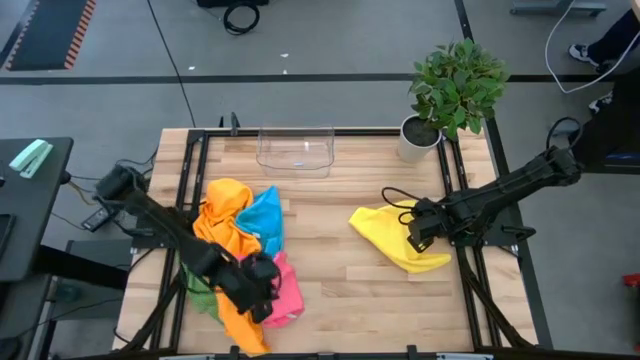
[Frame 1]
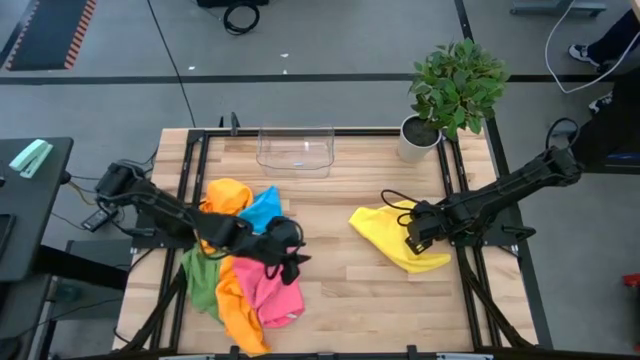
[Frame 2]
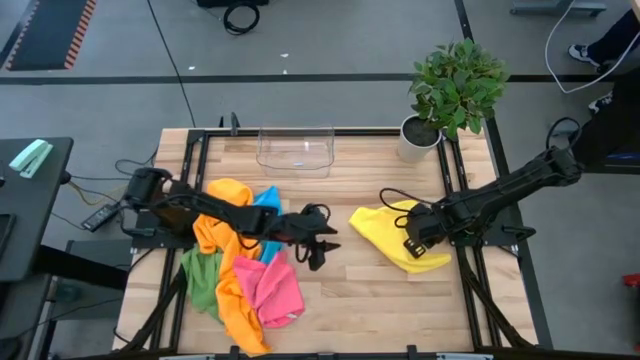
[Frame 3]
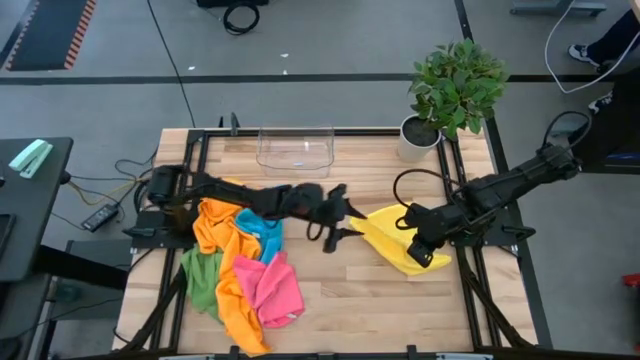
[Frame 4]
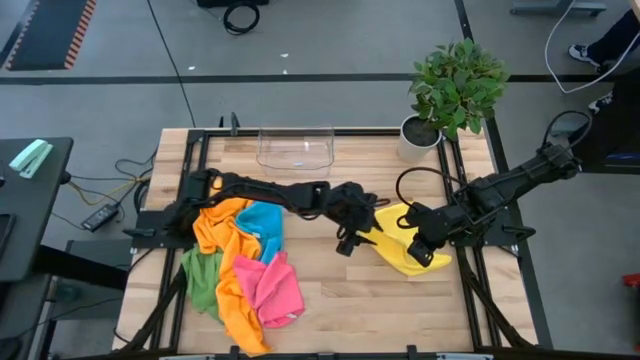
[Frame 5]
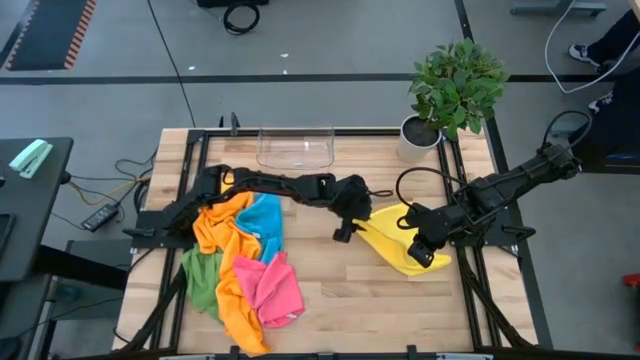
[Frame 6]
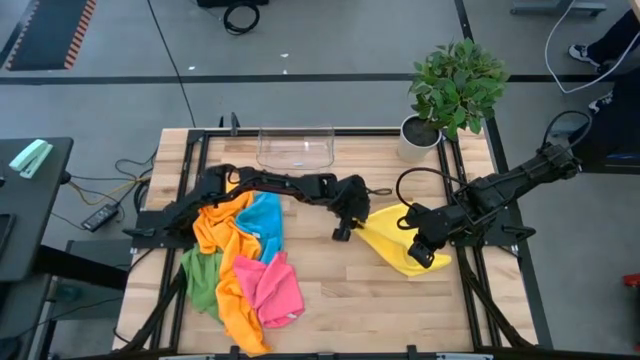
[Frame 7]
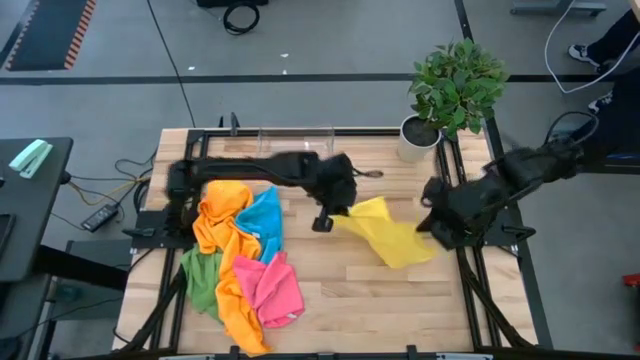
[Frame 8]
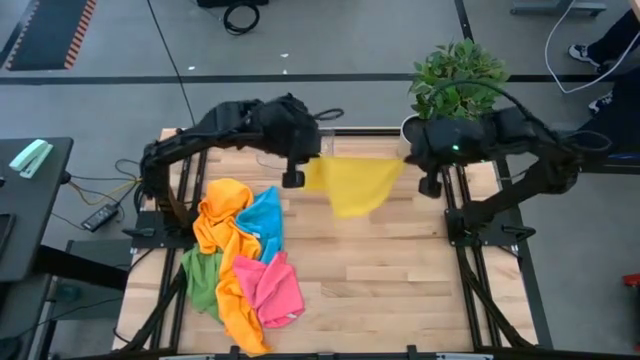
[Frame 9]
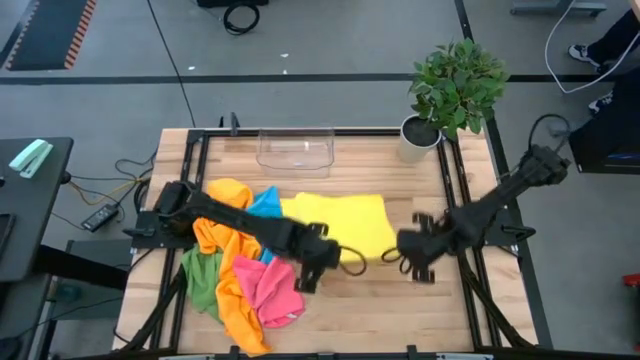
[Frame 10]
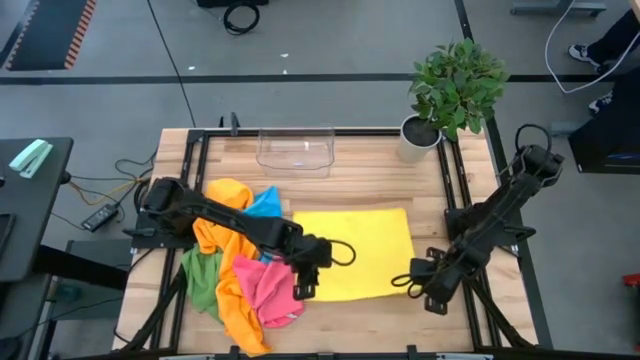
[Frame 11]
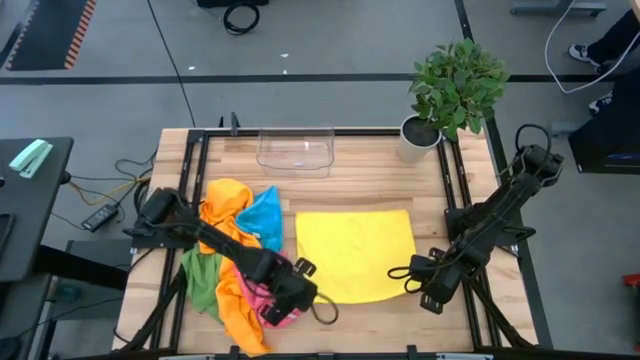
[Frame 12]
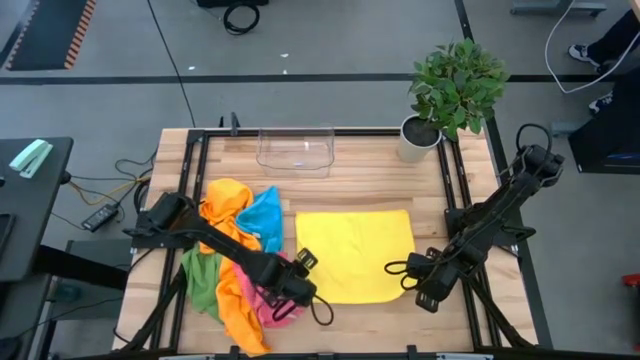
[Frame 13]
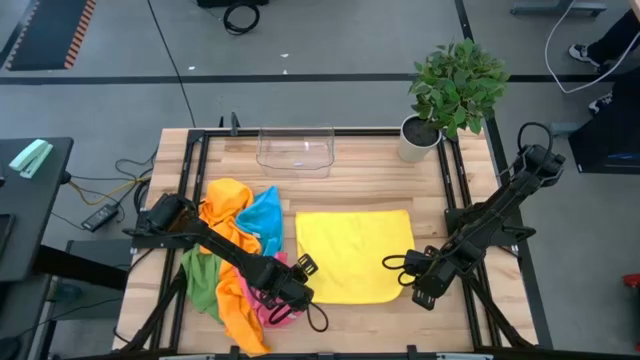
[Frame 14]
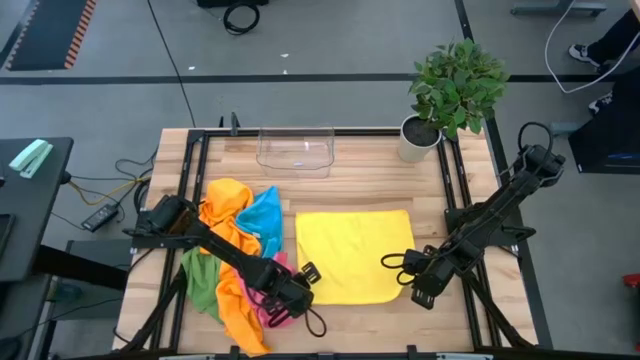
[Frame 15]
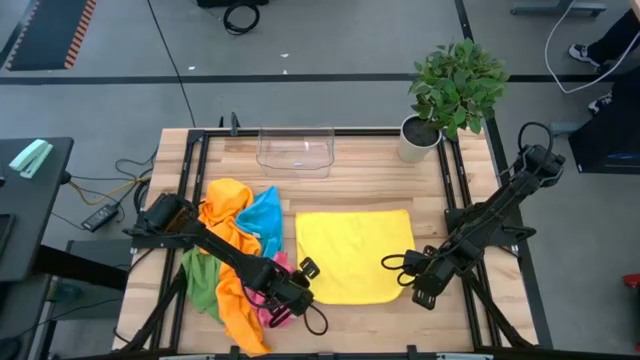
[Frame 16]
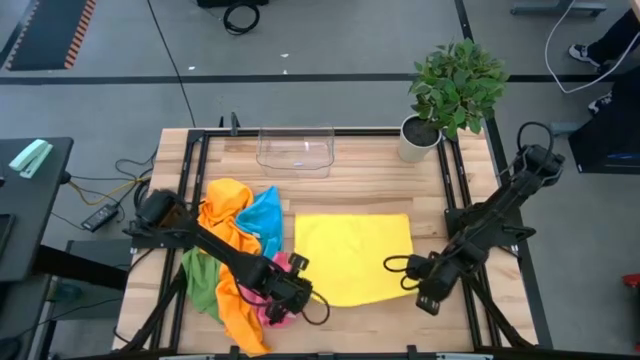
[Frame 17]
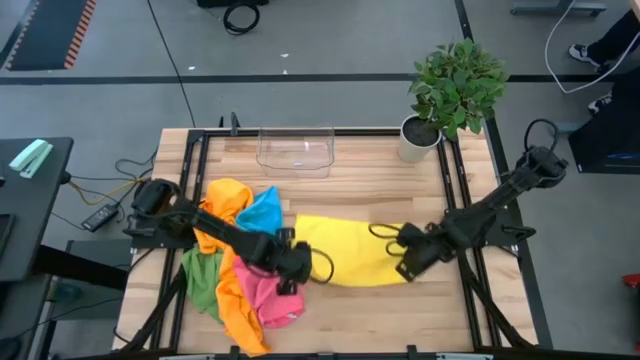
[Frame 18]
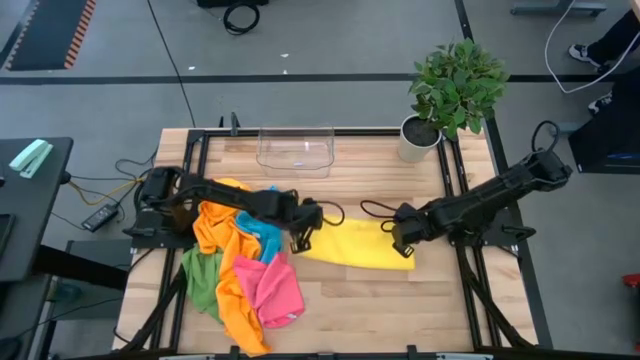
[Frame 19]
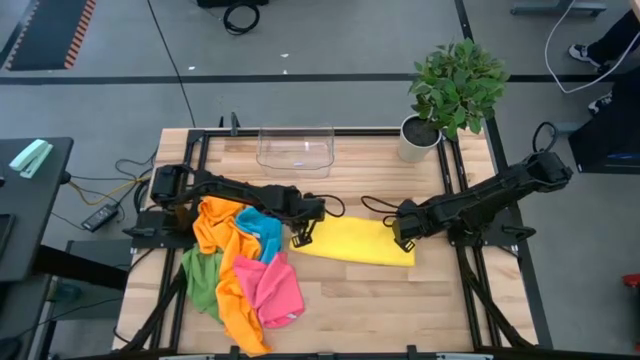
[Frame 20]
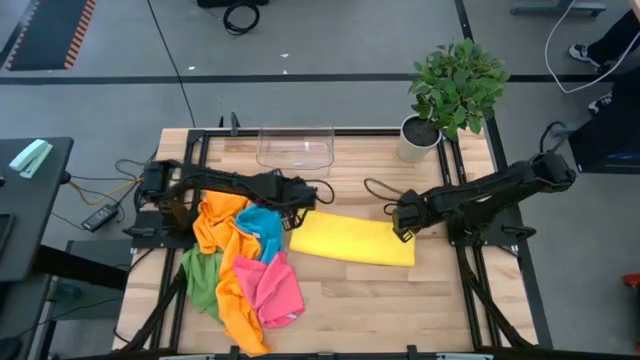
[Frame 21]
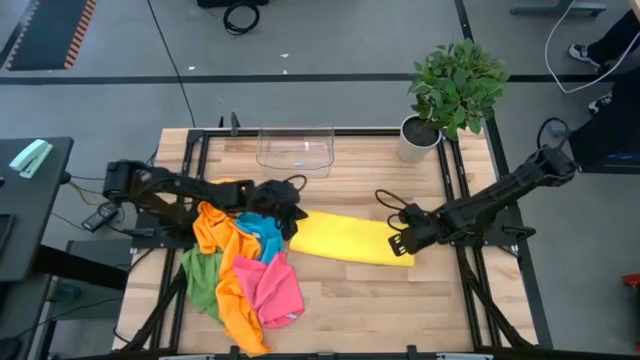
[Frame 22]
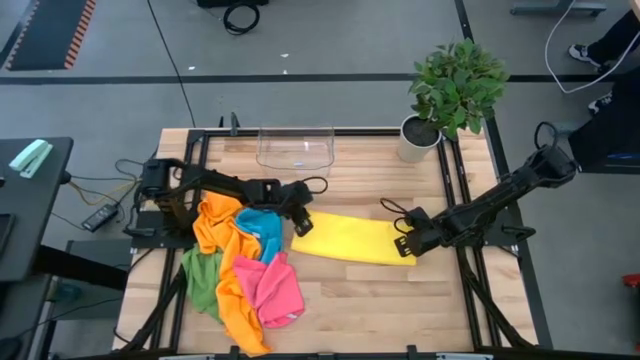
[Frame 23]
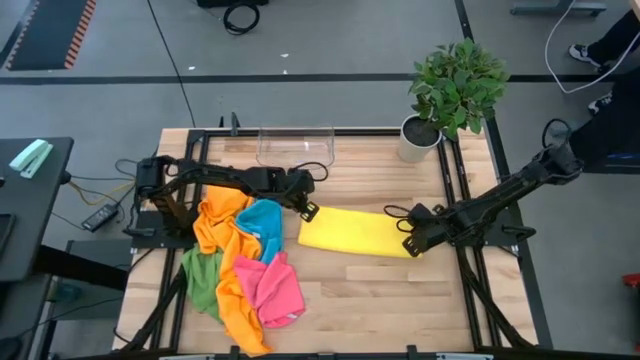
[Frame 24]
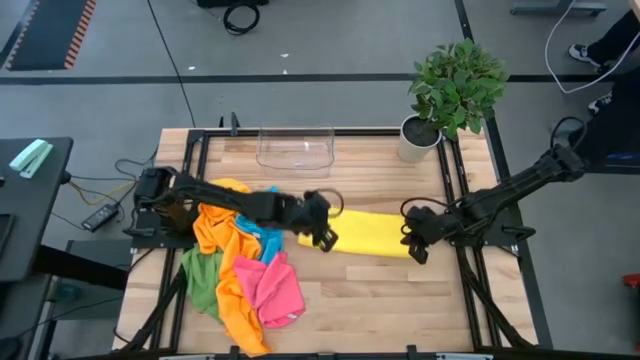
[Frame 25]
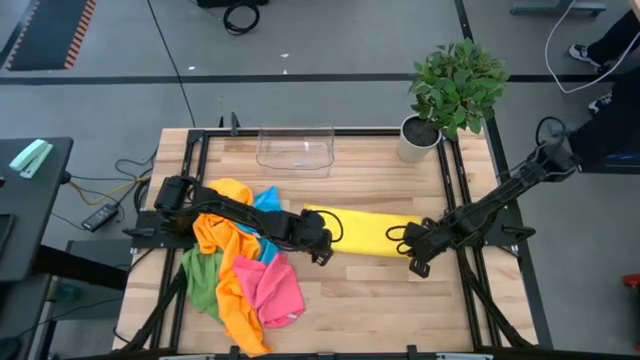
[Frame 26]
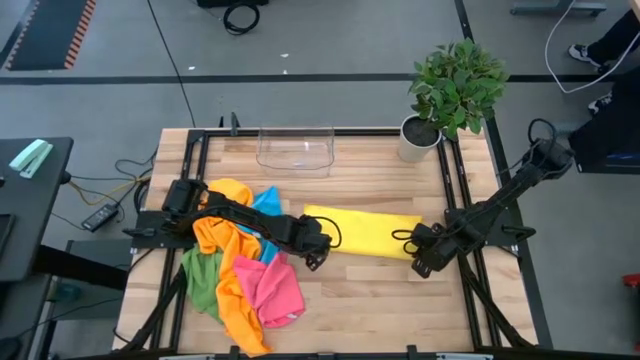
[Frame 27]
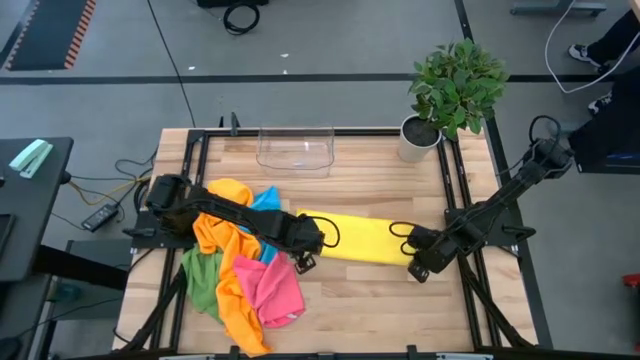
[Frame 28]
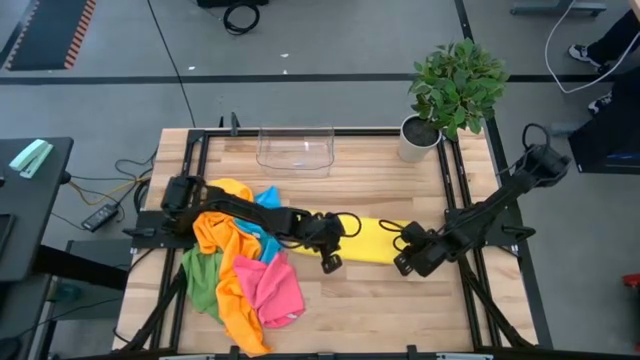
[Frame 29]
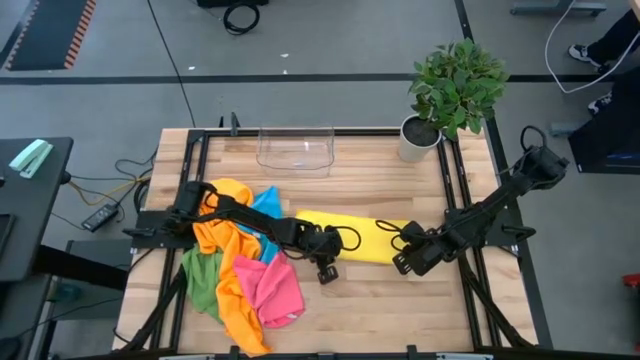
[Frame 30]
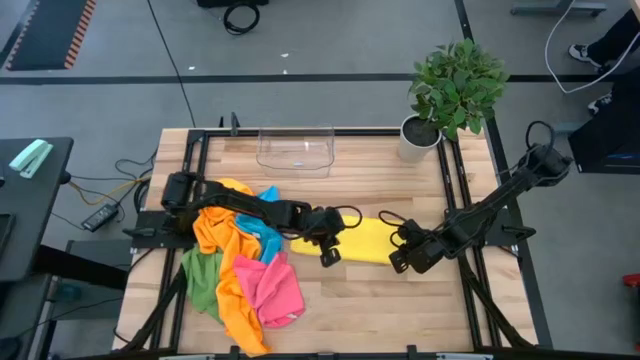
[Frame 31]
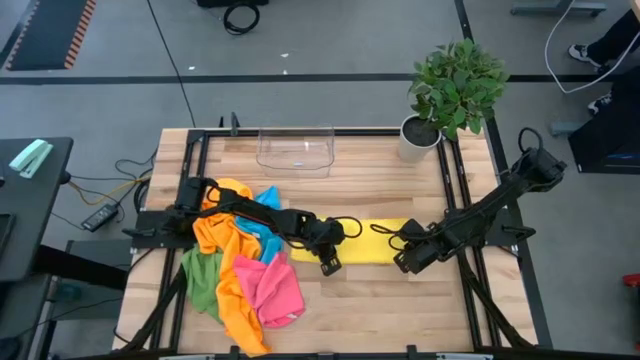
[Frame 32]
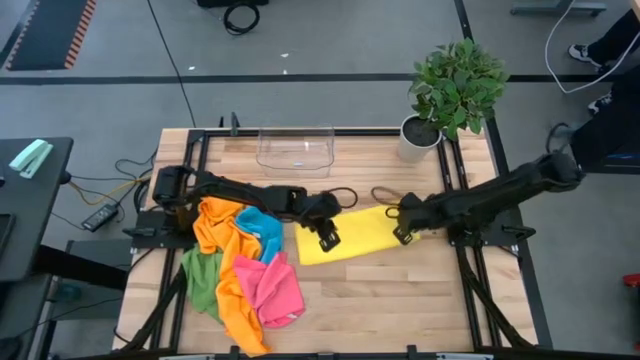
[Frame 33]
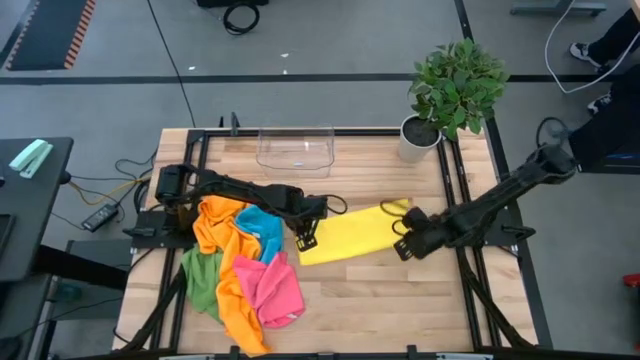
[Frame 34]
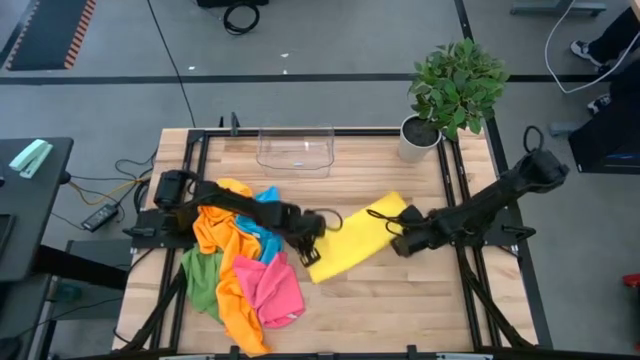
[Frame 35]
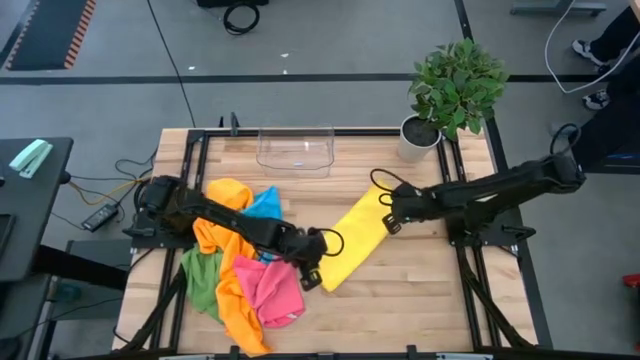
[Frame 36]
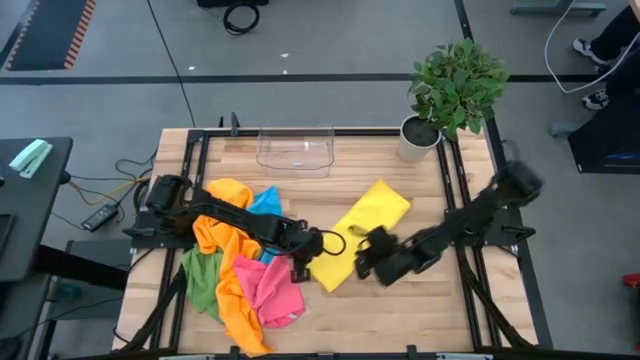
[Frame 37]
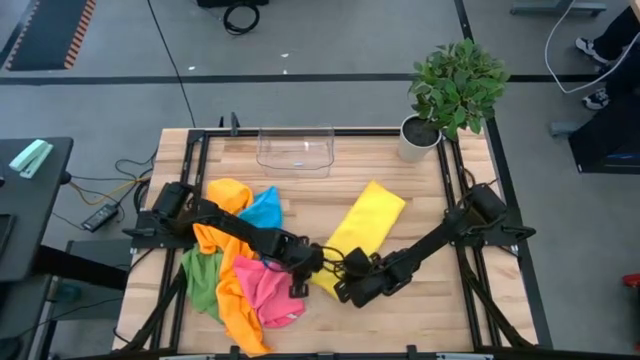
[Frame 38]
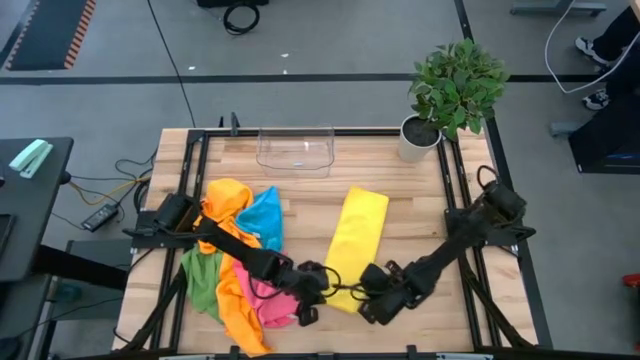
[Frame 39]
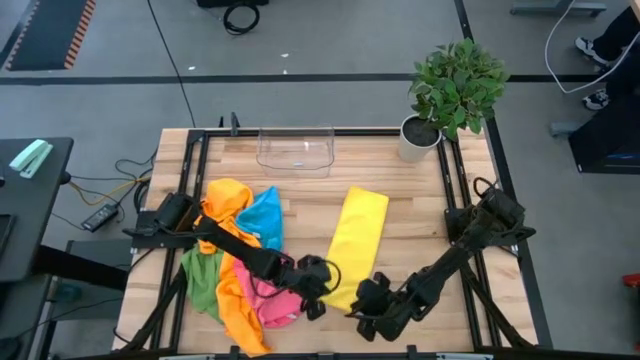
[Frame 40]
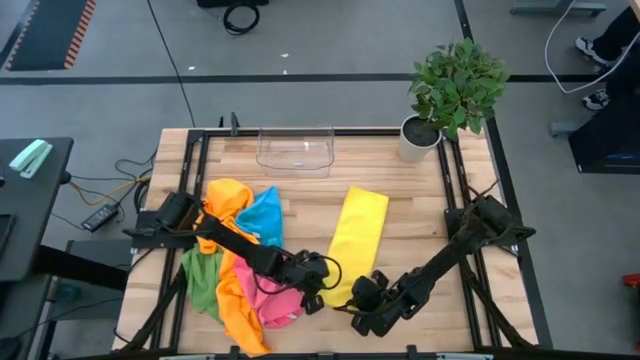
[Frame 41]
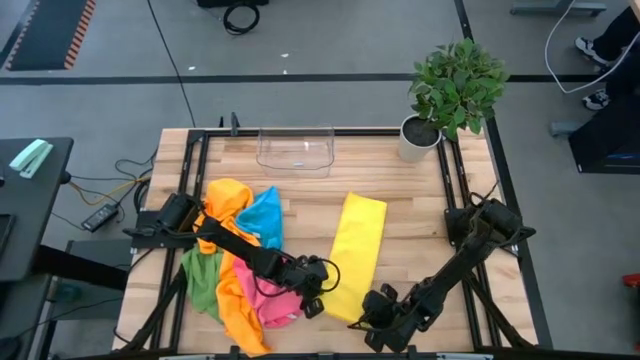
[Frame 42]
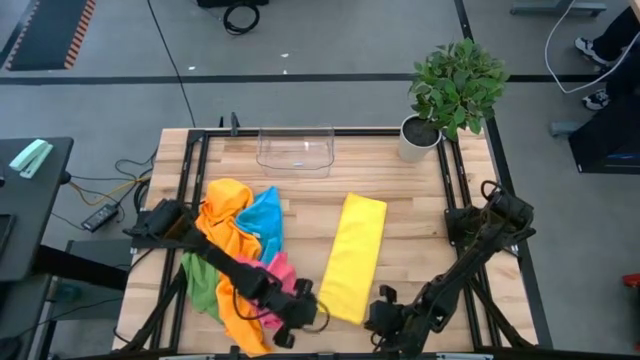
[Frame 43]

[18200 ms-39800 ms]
Task: Fold microfiber towels
Fold the yellow microfiber towel
